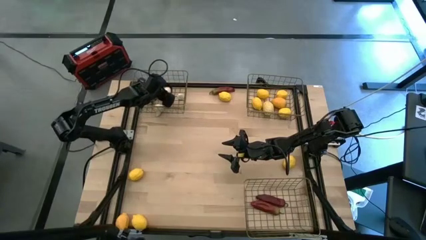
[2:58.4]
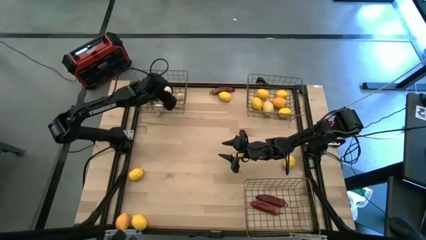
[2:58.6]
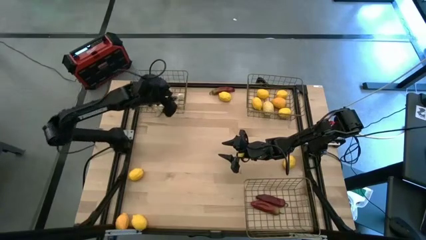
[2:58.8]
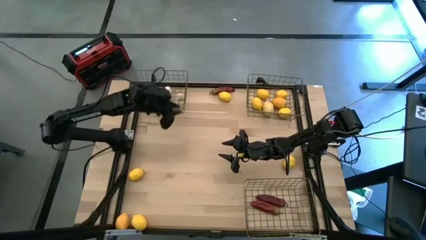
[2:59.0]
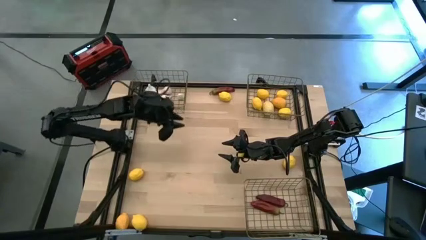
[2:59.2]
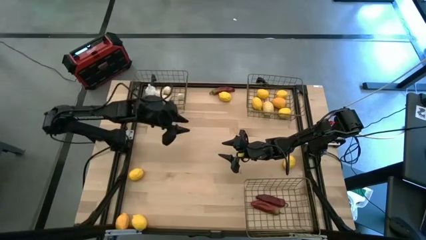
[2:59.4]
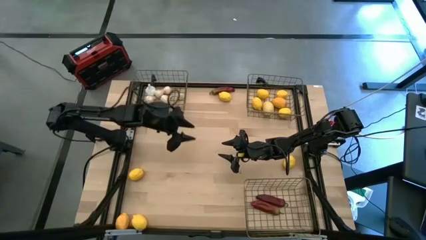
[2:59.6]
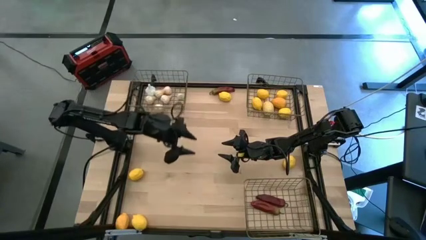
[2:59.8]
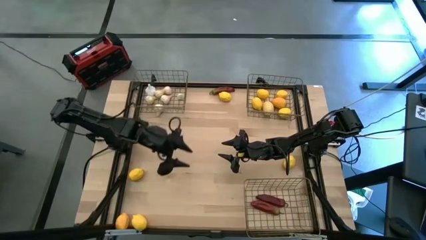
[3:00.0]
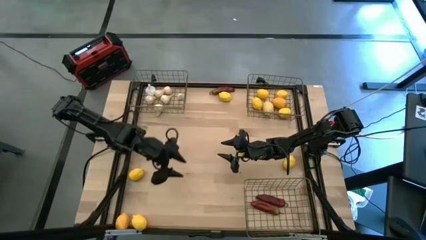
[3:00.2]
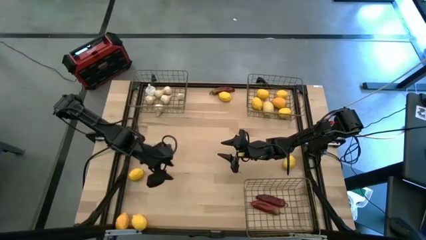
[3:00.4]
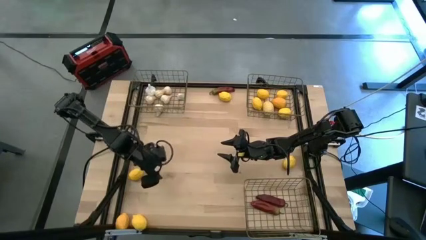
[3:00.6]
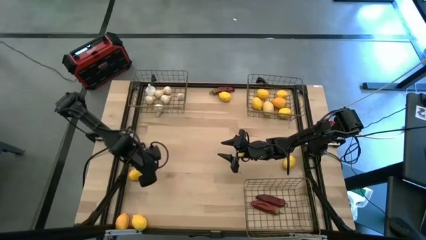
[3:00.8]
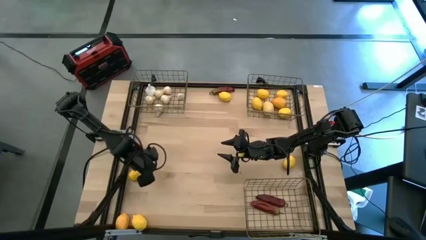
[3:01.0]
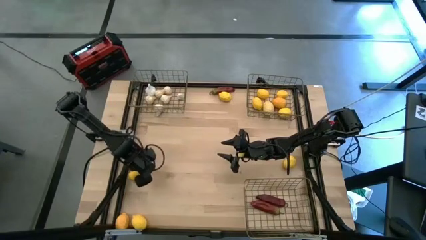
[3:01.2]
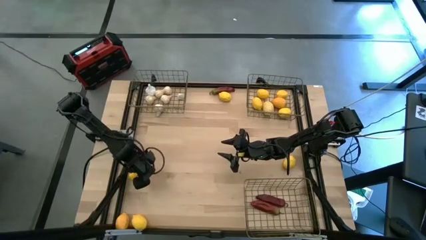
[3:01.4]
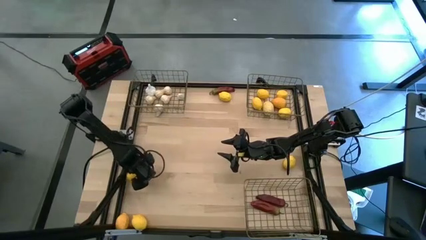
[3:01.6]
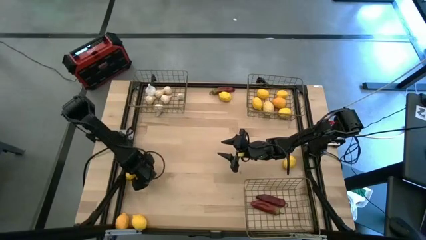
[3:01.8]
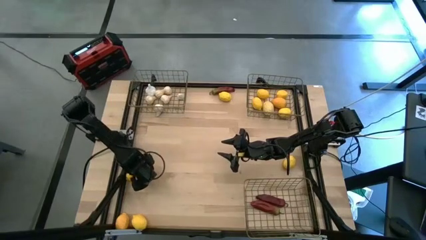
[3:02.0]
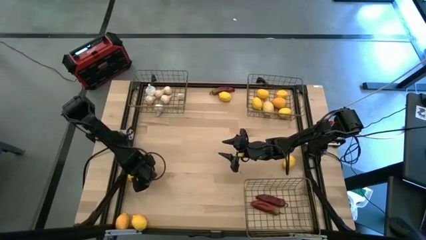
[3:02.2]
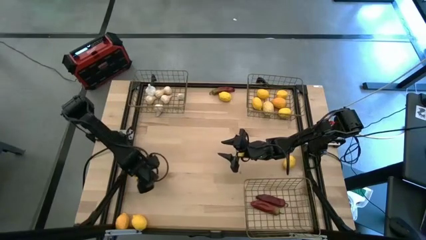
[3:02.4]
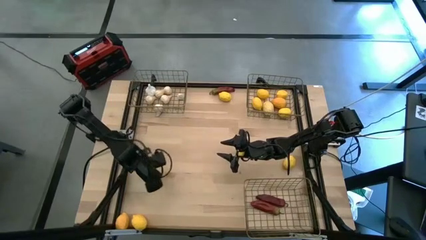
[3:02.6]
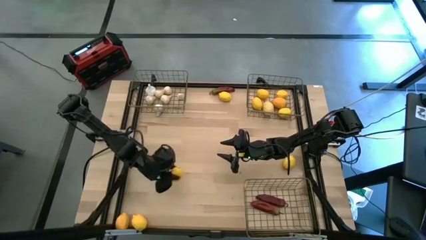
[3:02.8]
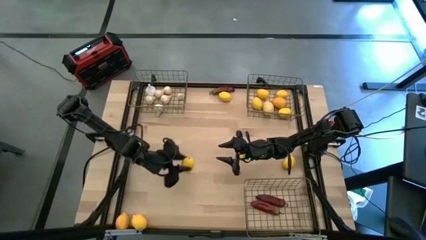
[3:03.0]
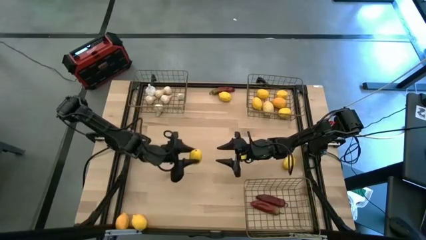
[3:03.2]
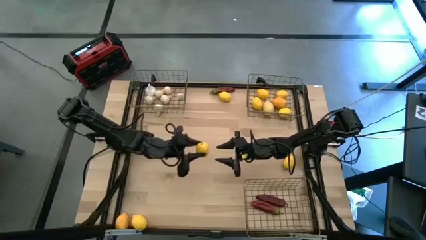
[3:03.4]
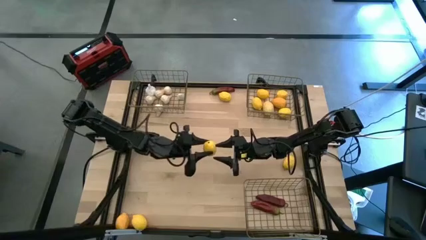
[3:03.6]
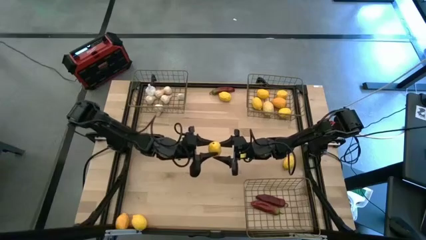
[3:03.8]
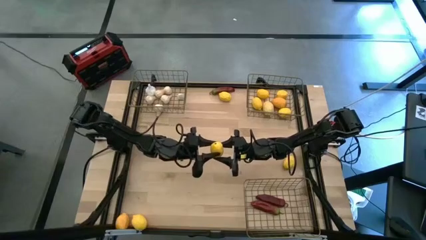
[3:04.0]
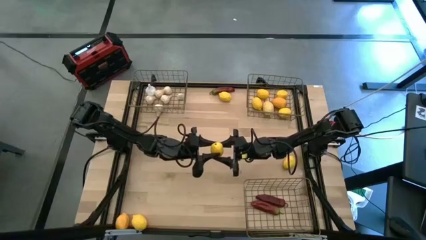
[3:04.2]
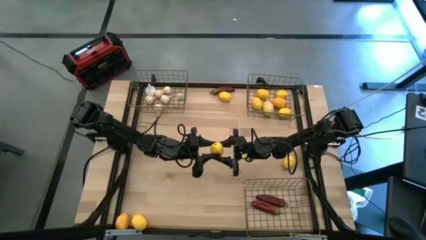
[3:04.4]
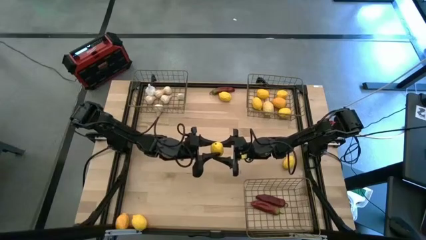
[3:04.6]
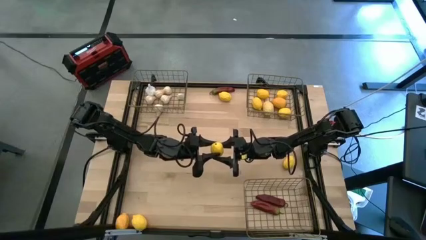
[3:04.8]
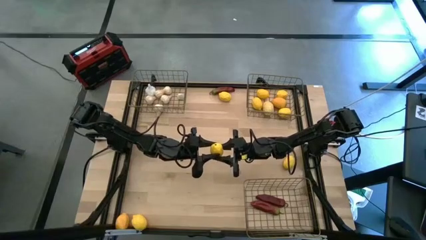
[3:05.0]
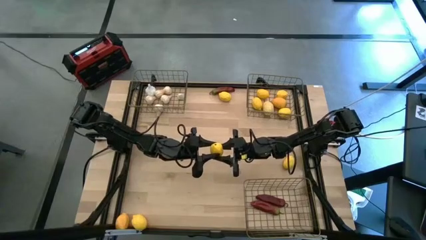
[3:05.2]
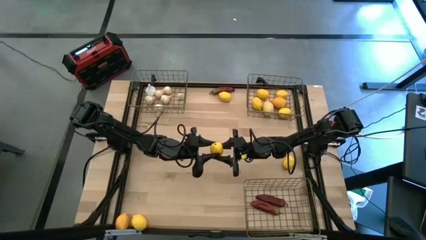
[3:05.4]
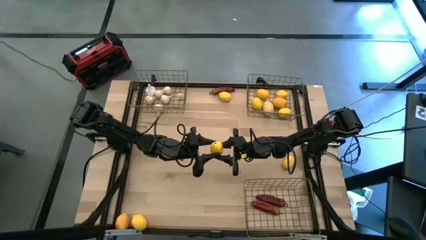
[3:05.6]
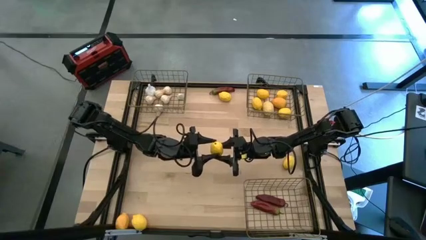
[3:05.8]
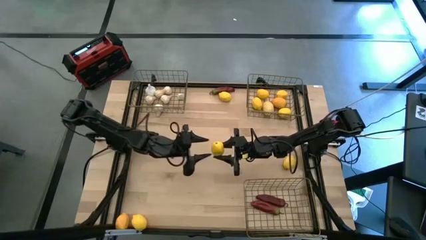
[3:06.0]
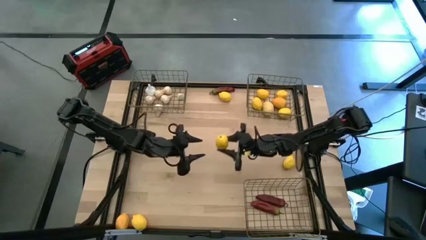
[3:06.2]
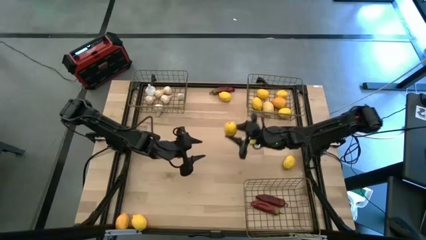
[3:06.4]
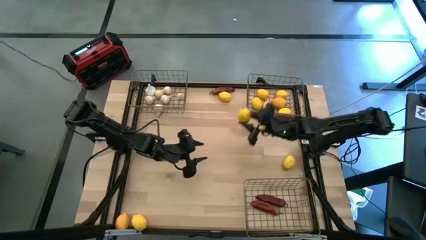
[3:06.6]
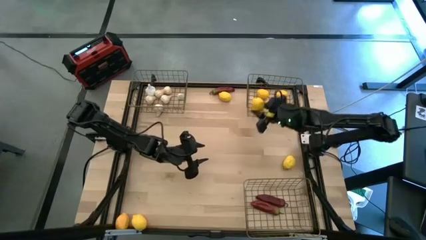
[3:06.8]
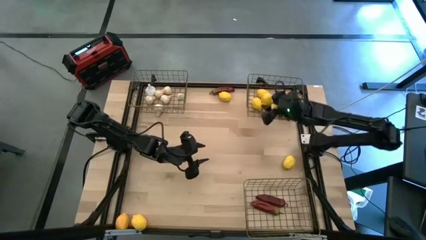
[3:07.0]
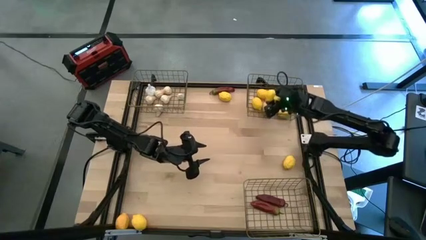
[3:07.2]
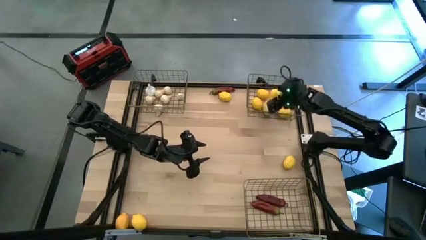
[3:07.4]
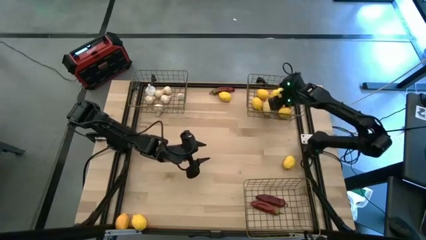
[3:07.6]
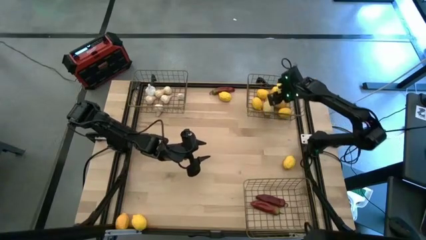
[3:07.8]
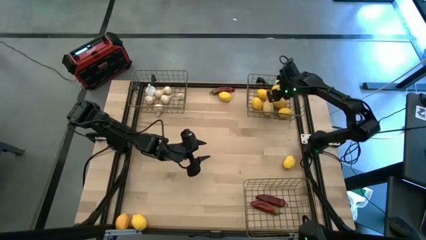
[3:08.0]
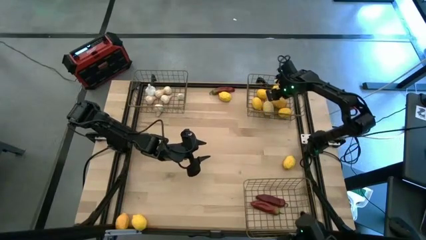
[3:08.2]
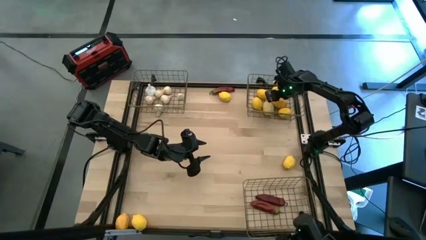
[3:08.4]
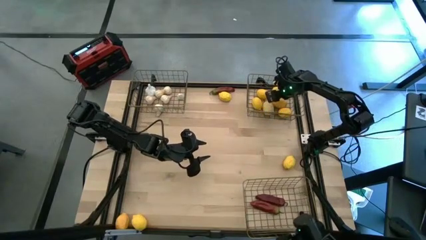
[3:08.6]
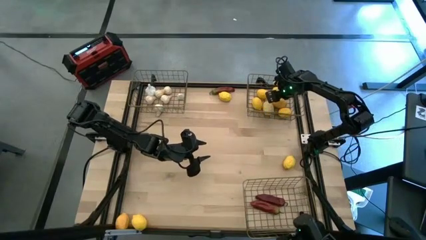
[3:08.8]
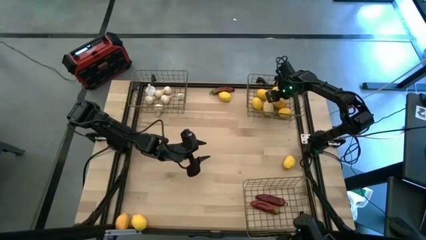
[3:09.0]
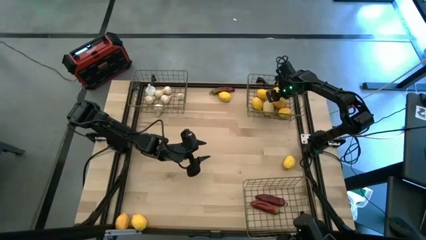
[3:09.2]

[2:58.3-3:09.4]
Task: Sort produce into baskets
Put the yellow lemon into the top right wire basket

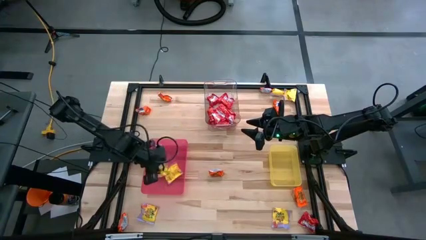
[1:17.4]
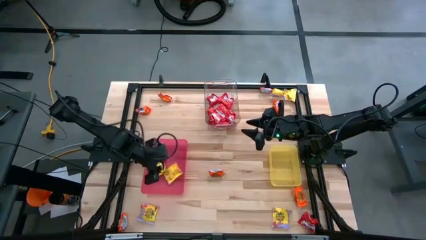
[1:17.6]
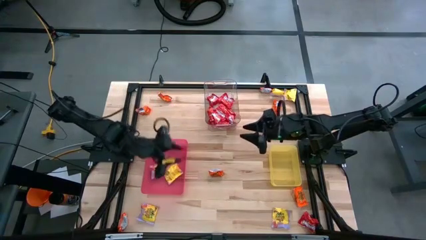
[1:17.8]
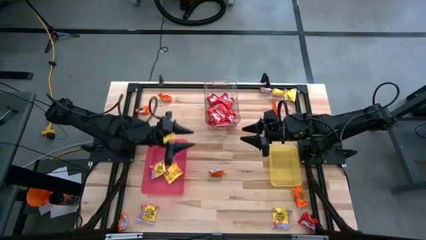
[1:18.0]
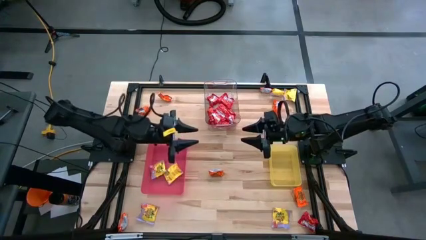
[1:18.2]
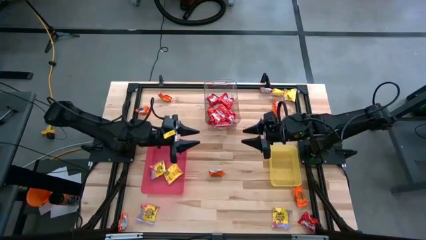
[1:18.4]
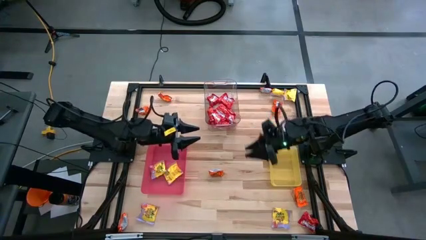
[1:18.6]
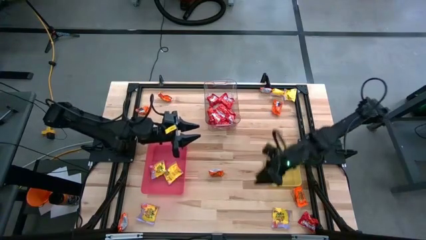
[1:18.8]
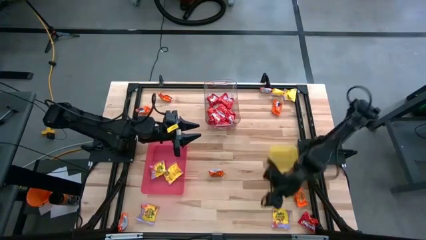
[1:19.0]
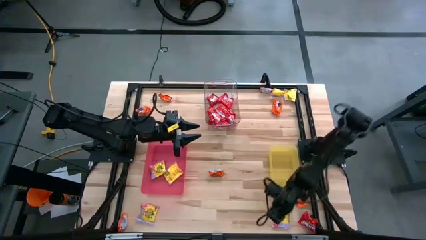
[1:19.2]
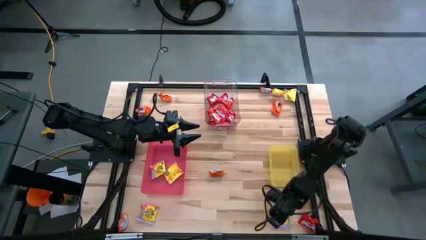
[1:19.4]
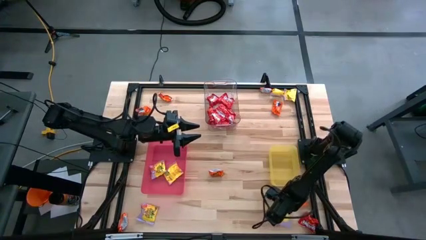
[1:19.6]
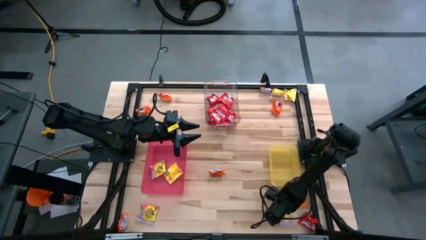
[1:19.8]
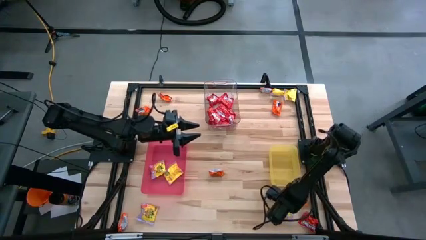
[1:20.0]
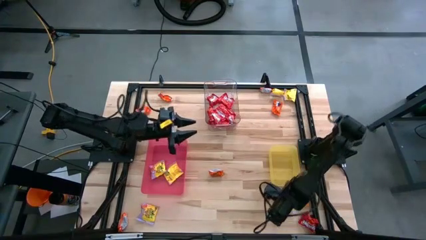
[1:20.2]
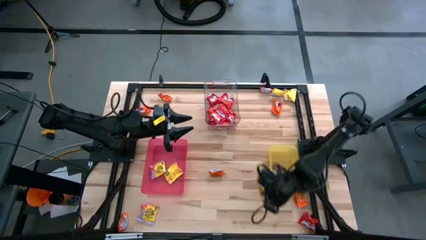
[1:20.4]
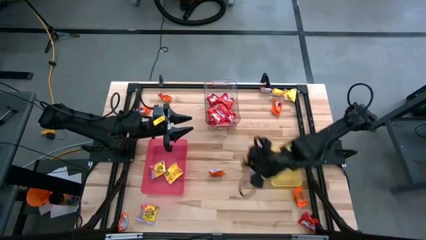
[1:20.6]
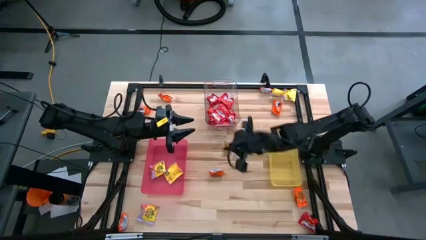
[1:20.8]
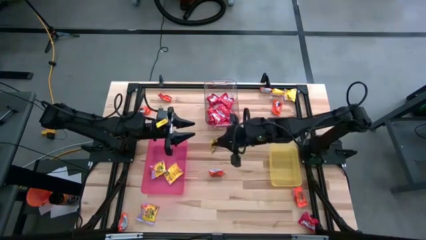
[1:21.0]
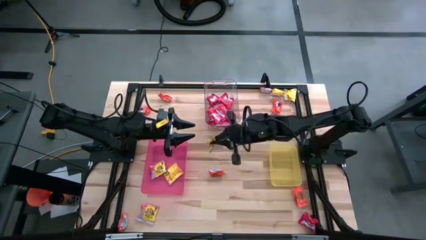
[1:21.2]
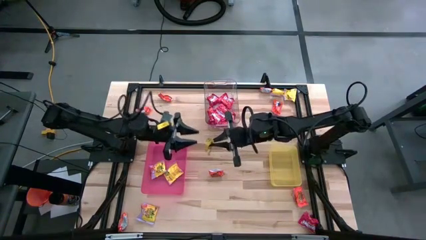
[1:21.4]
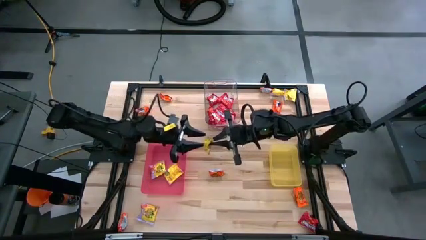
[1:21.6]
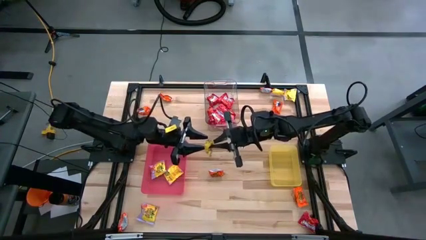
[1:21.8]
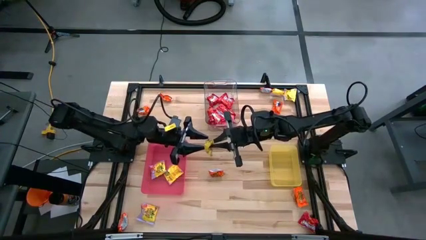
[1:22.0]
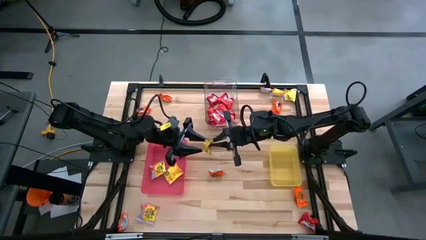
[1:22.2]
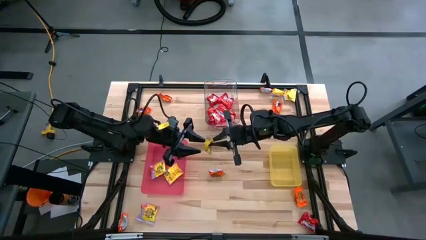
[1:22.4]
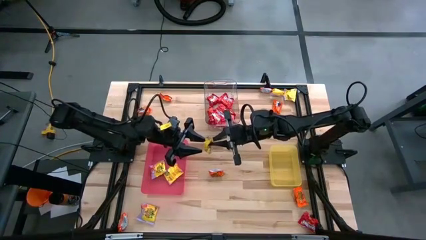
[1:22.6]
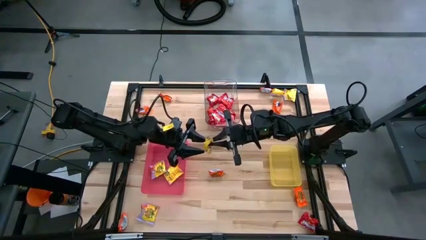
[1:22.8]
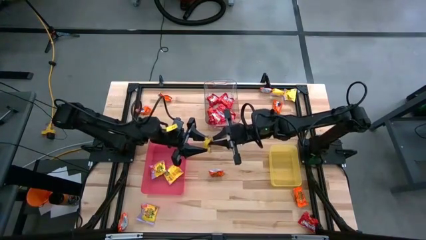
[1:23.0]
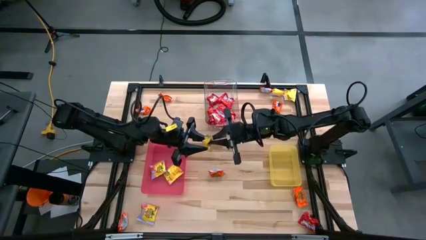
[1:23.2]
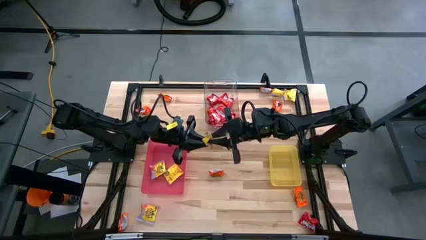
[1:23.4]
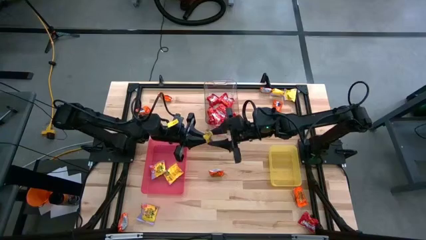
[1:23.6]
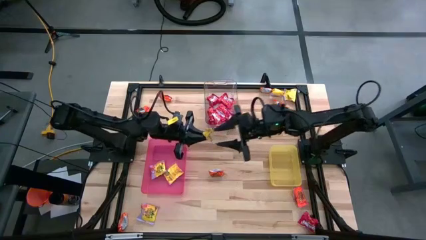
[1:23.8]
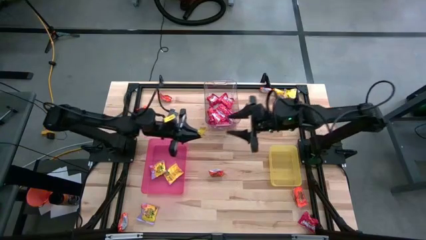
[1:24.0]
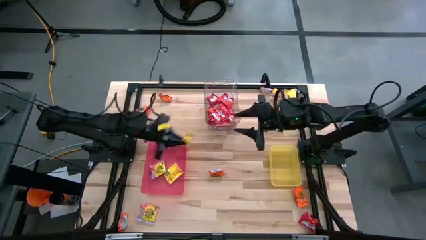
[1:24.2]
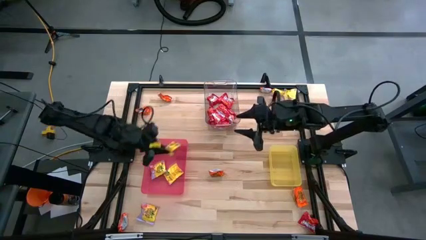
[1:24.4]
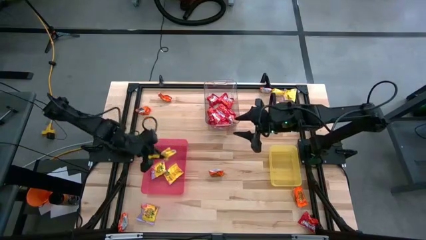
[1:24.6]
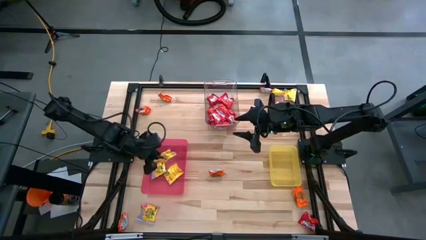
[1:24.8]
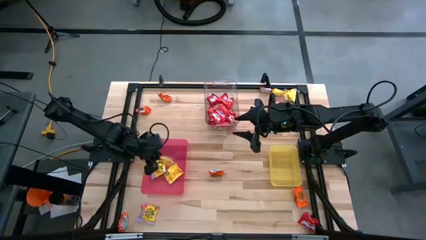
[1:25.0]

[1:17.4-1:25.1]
Task: Sort candy
Put the yellow candy into the pink bin
